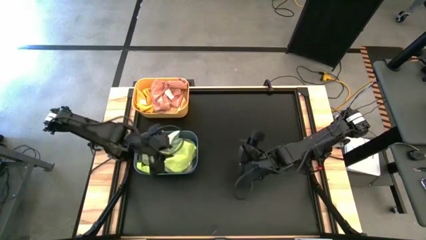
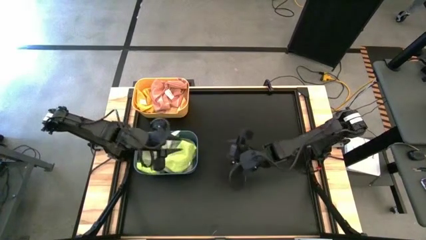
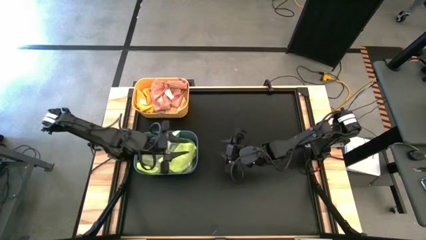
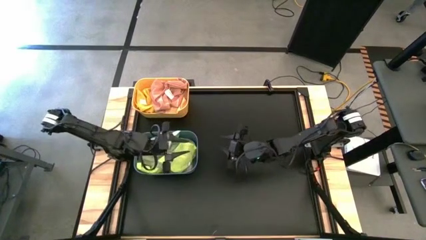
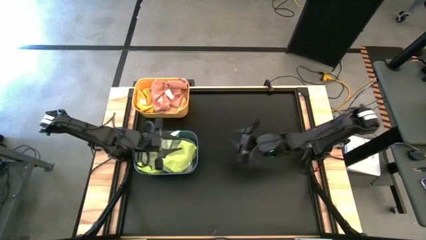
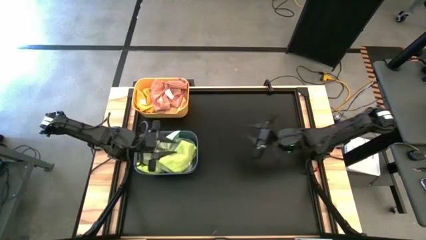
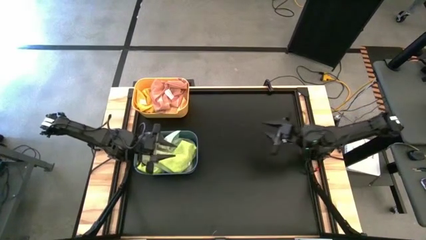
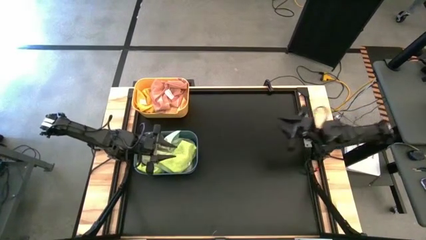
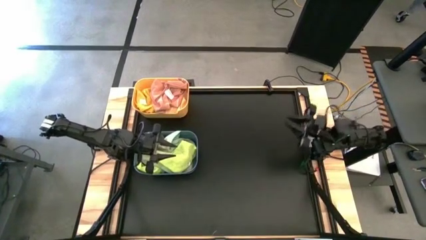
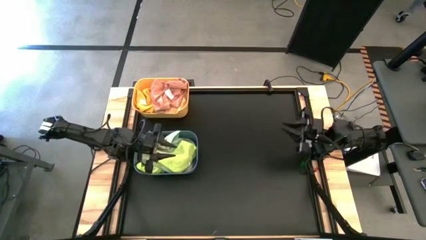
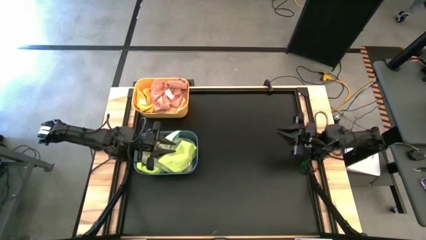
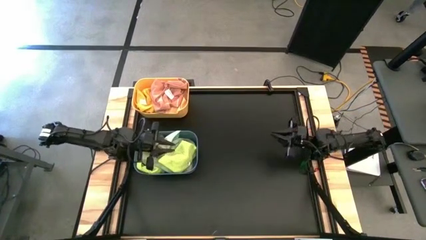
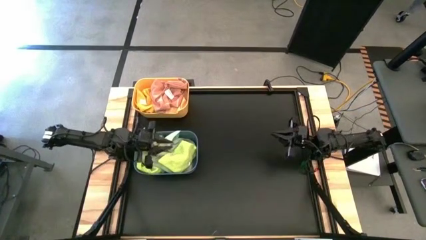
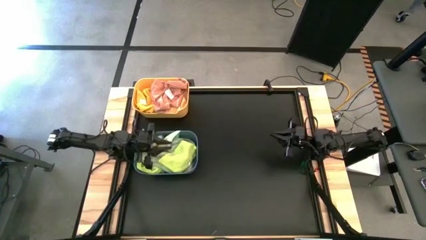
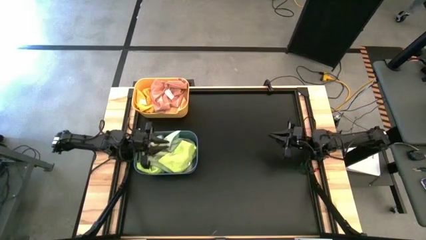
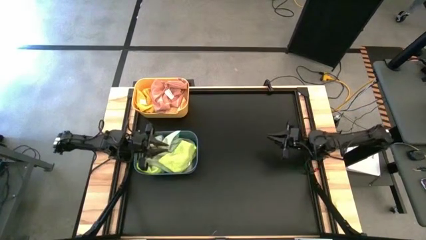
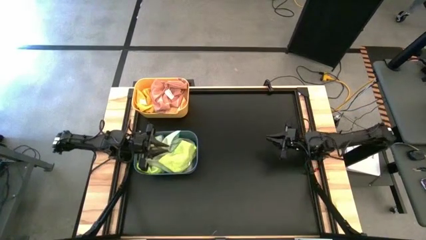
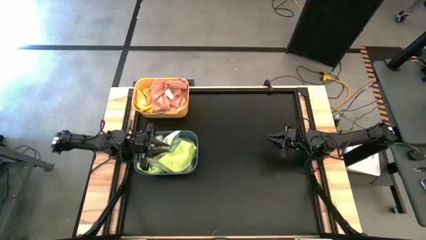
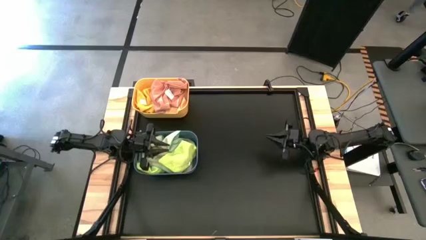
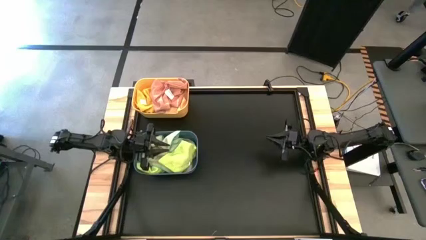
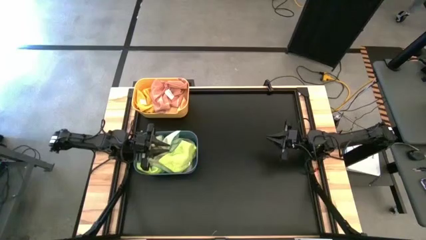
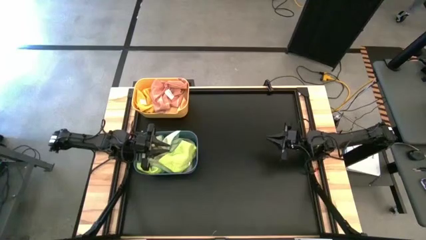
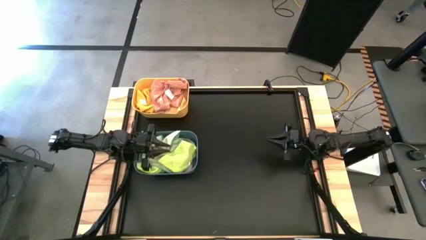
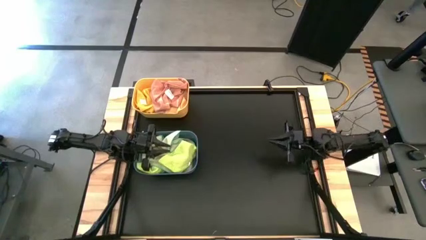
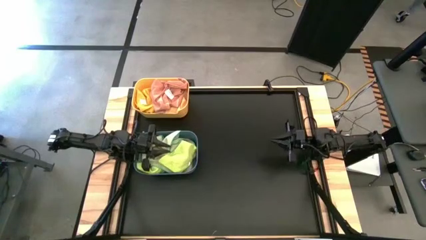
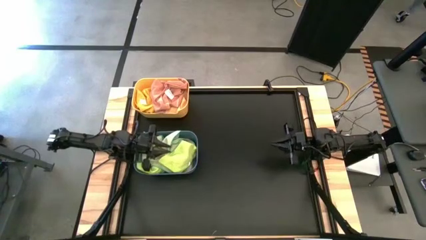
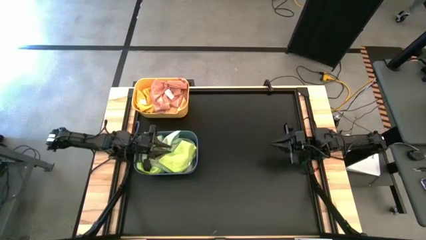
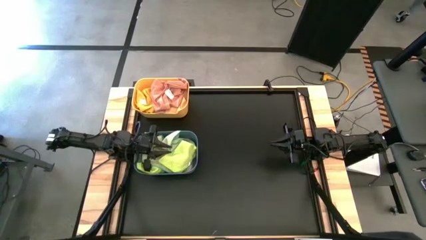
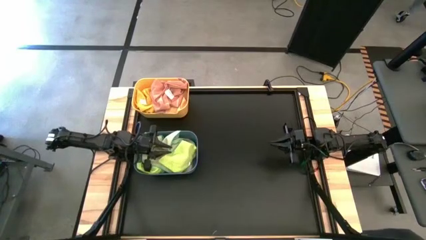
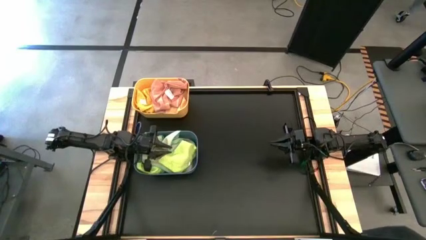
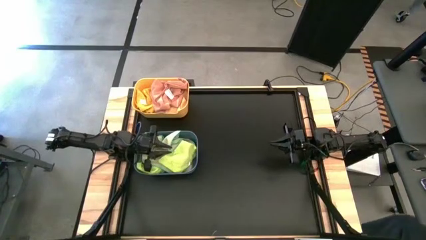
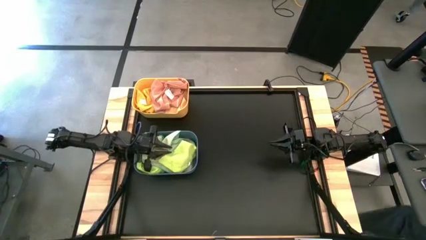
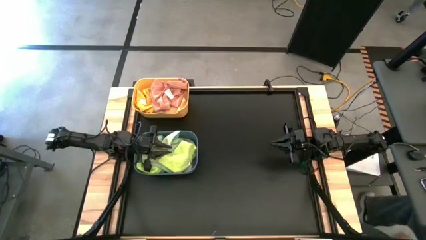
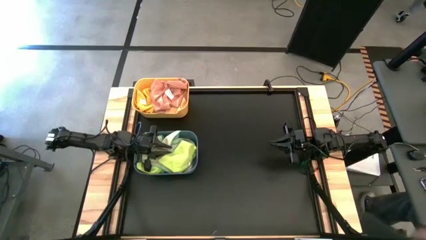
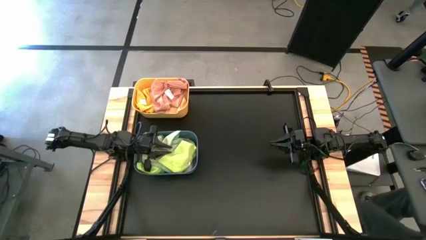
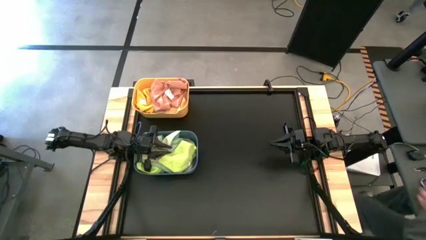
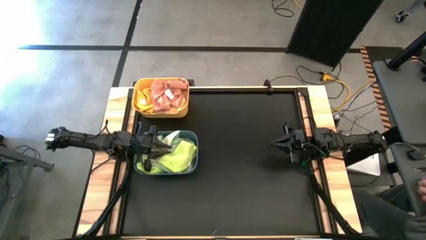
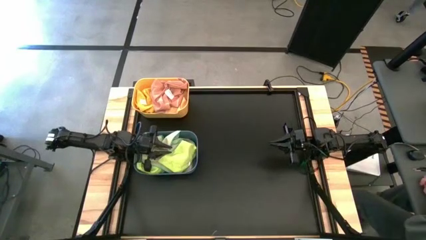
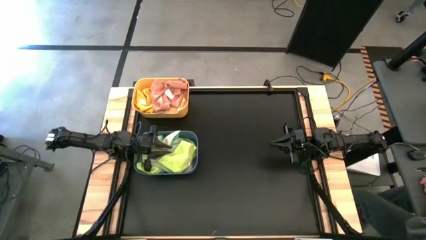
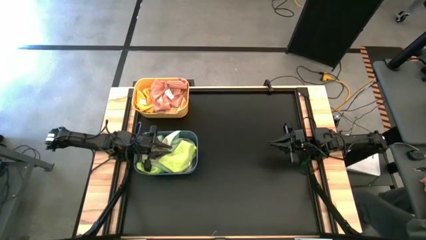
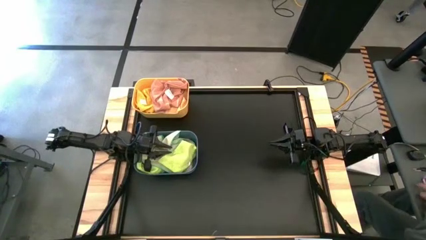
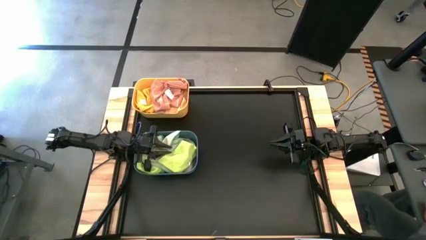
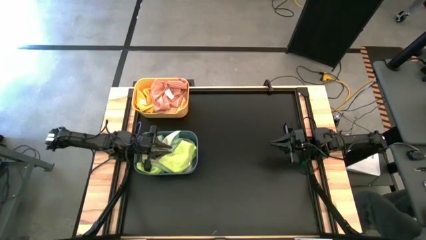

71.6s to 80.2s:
Task: Sort microfiber towel by color & place in baskets
Return to Home Position

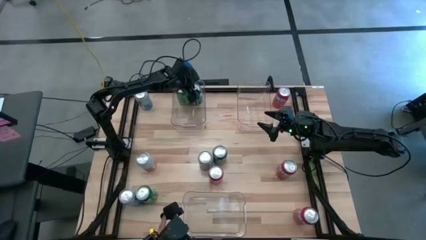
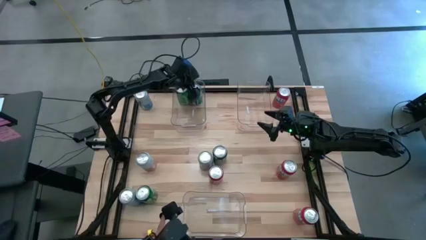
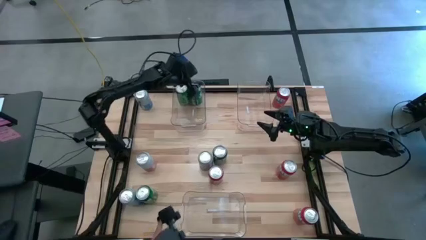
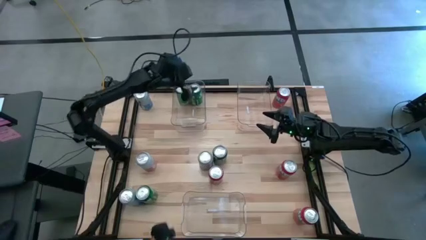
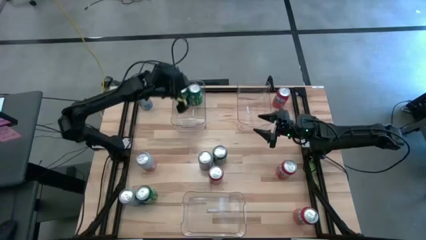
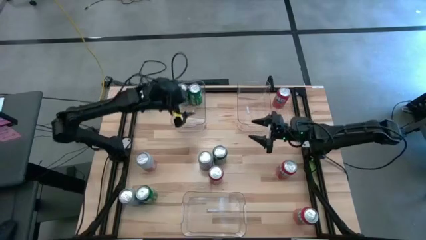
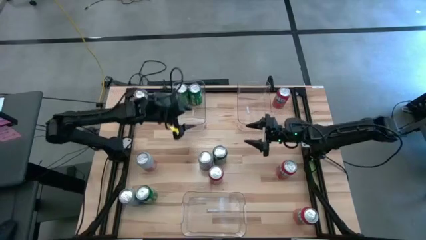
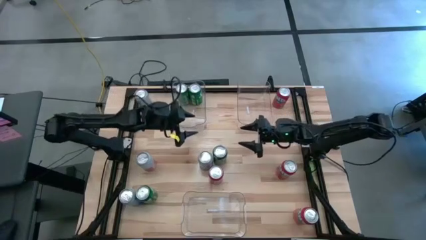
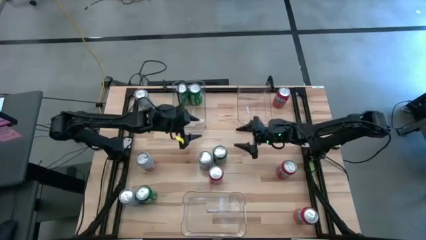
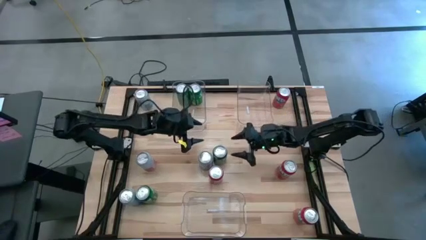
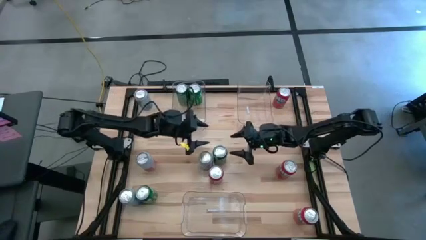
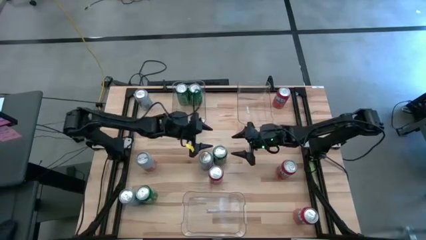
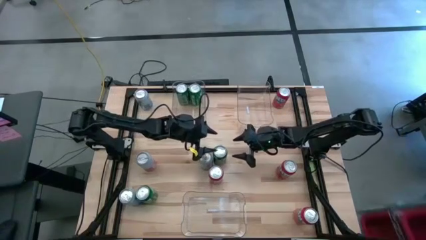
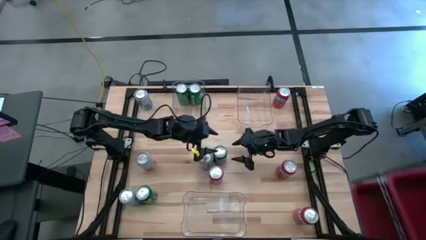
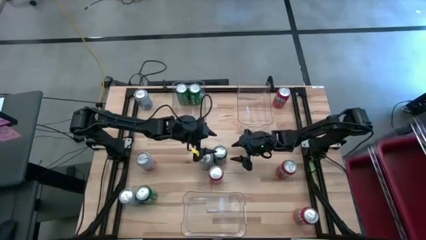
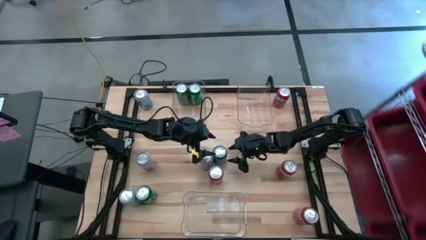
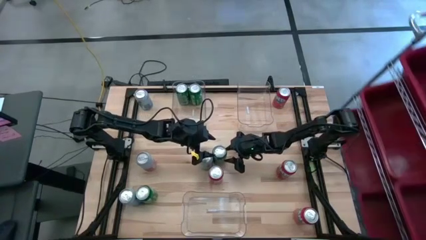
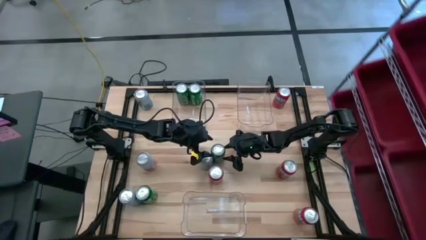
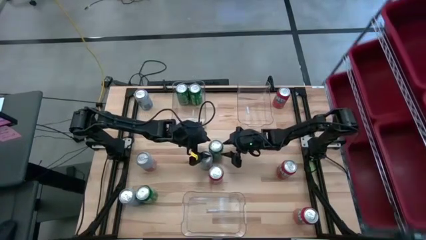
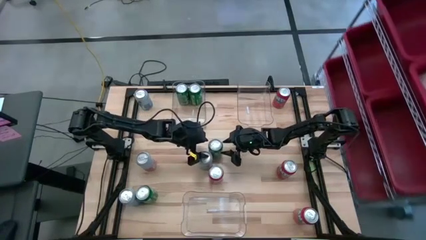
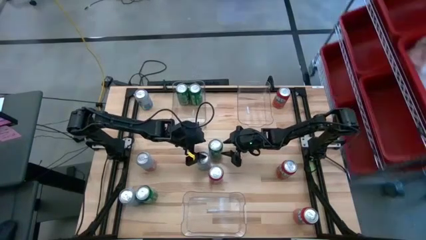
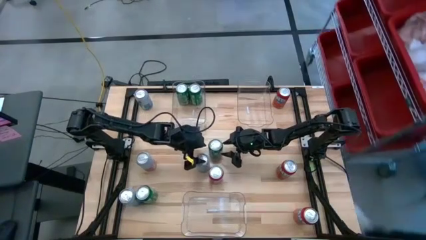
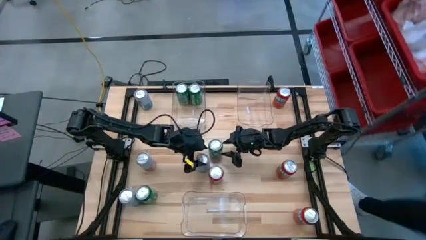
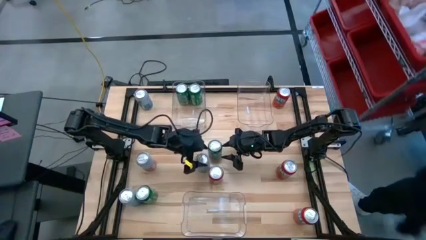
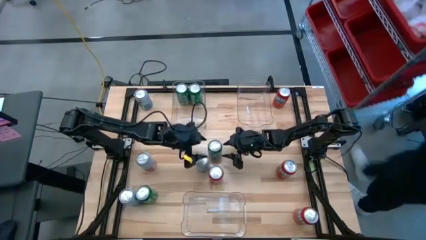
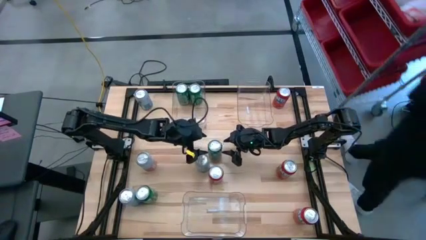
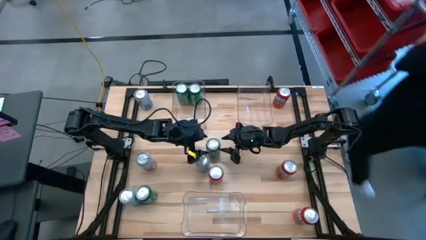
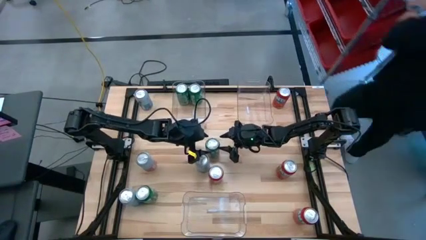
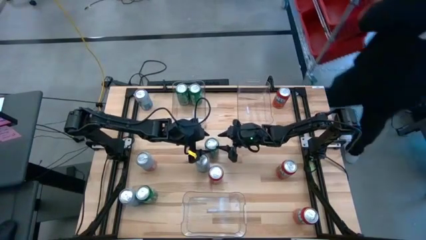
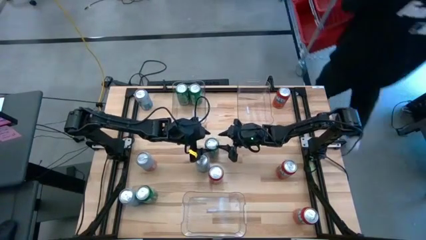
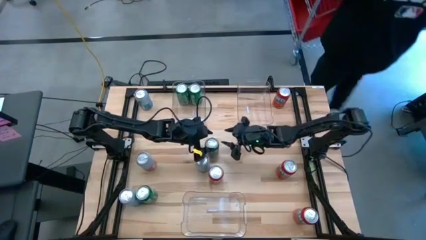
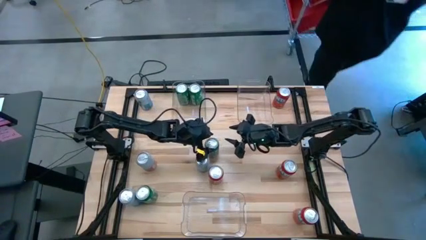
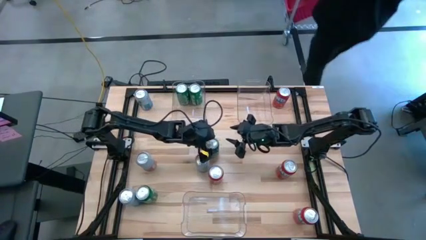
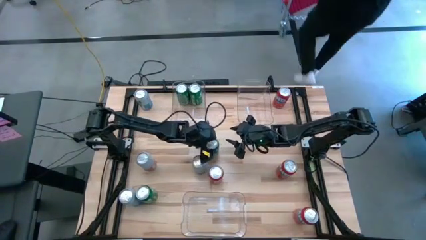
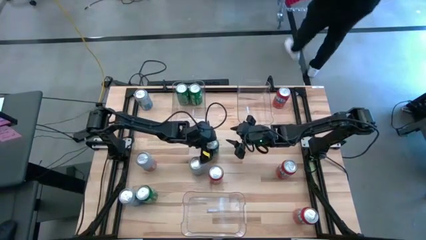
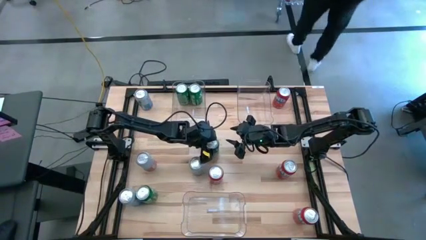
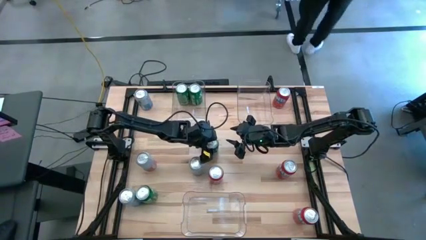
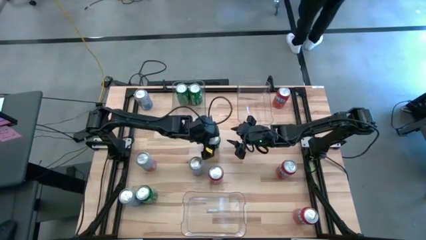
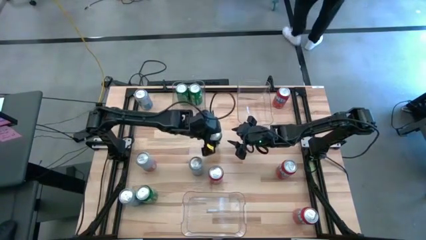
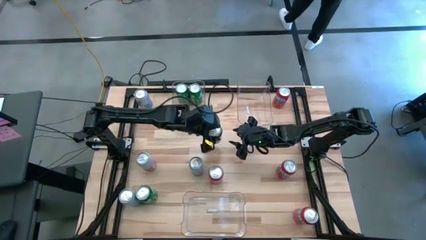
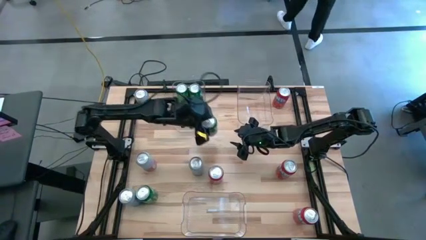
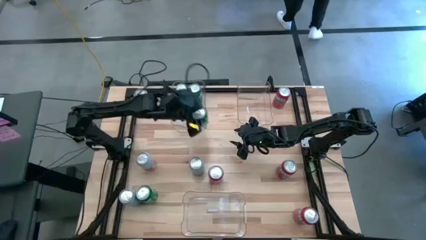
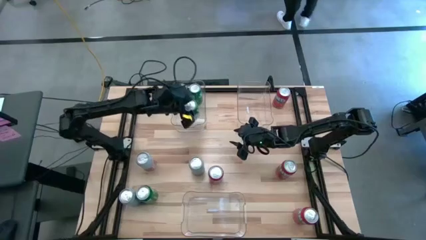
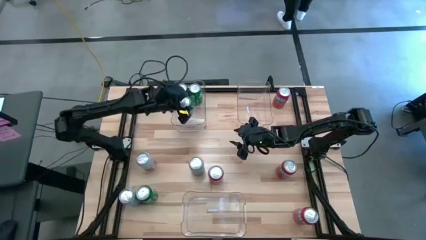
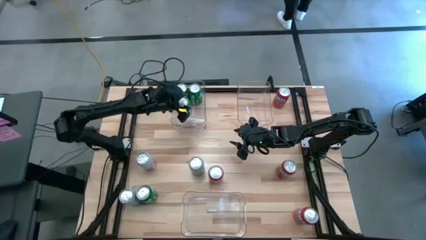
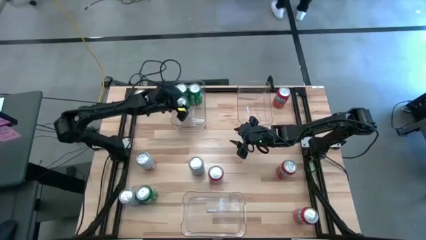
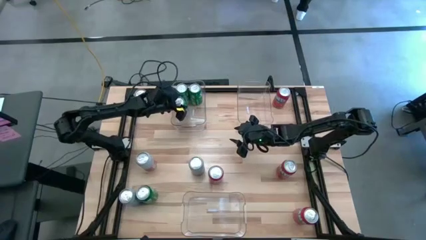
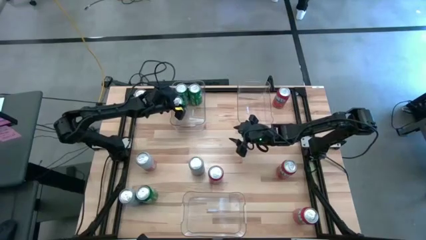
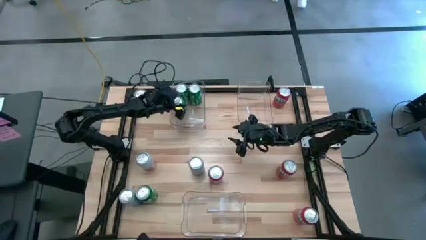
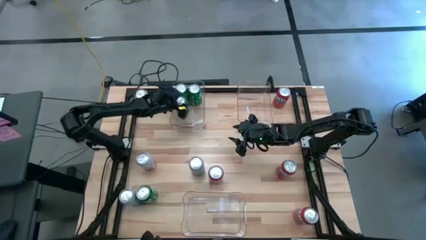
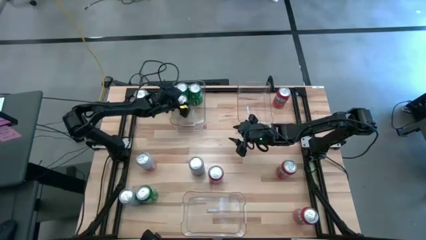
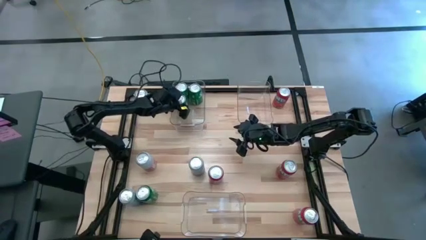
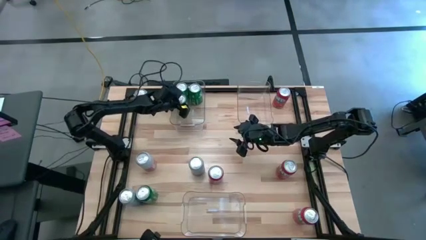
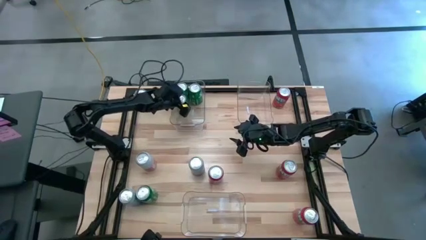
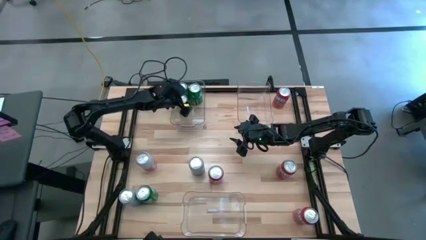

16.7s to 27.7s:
Task: Sort soda cans
Put the green soda can into the top left transparent bin
